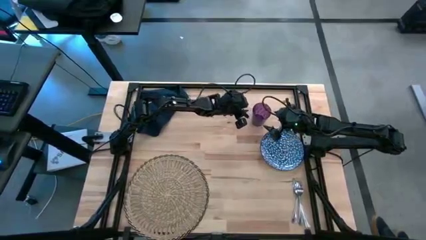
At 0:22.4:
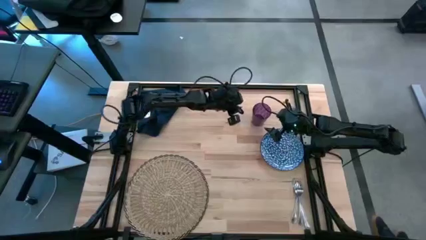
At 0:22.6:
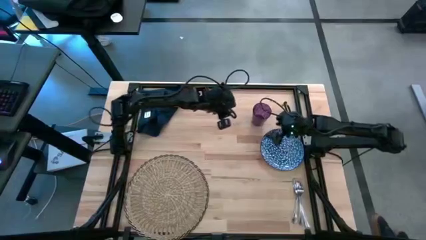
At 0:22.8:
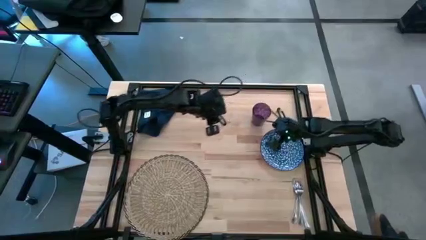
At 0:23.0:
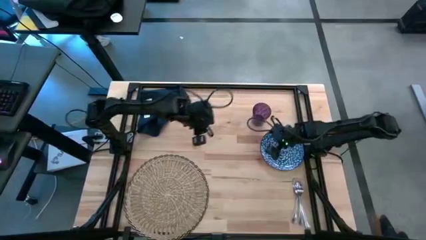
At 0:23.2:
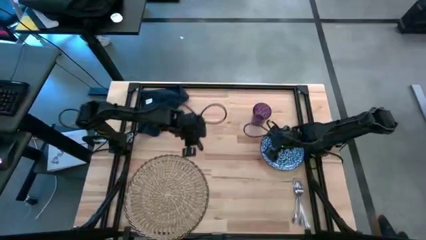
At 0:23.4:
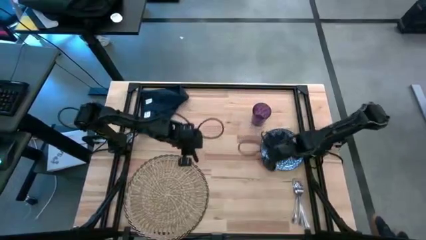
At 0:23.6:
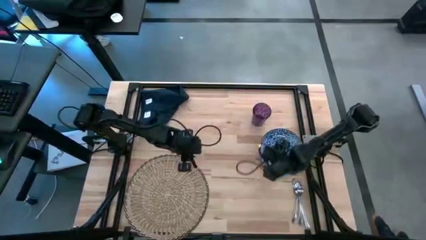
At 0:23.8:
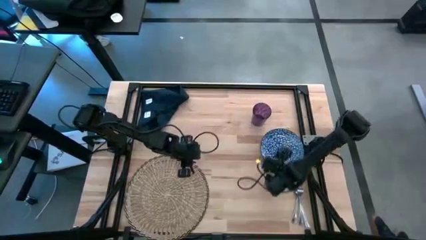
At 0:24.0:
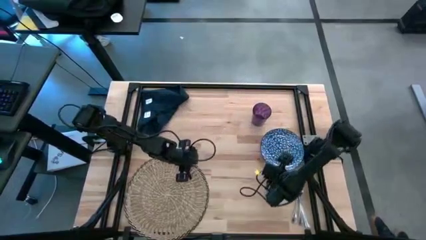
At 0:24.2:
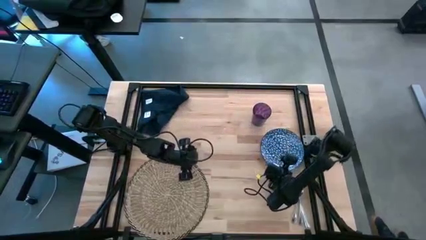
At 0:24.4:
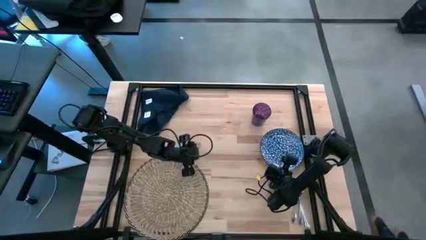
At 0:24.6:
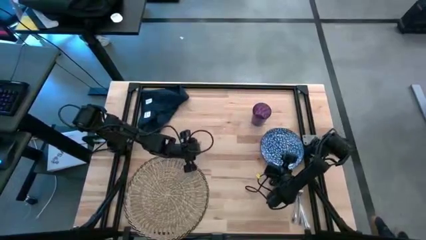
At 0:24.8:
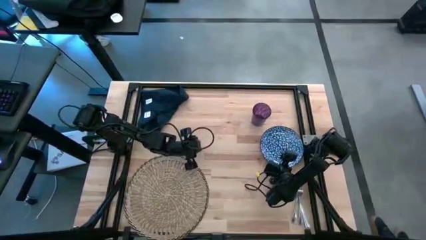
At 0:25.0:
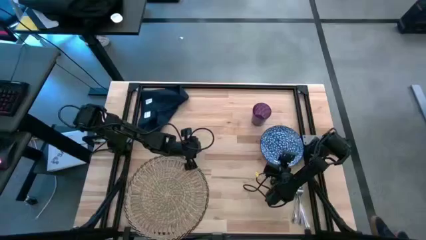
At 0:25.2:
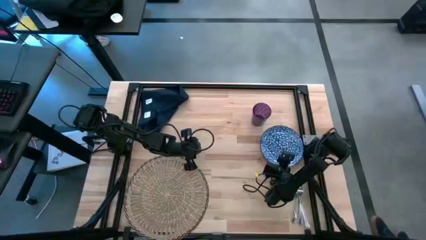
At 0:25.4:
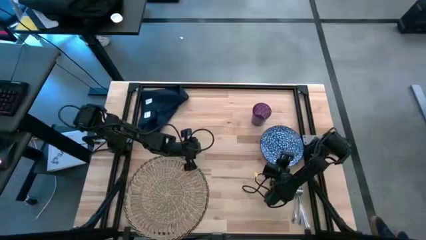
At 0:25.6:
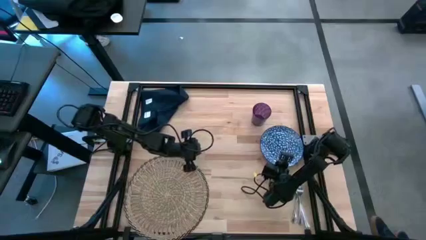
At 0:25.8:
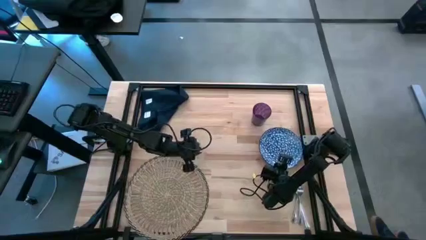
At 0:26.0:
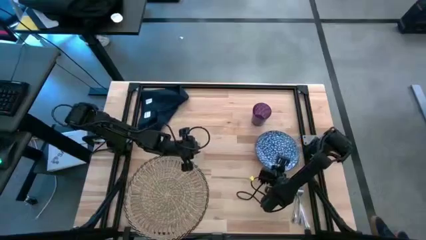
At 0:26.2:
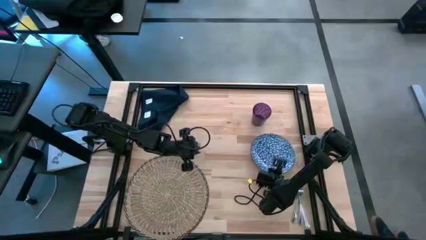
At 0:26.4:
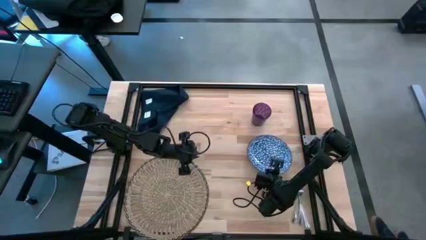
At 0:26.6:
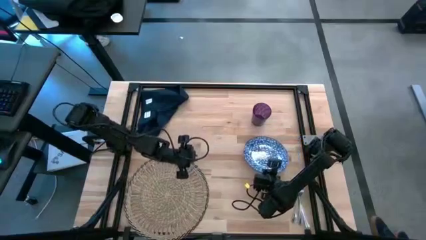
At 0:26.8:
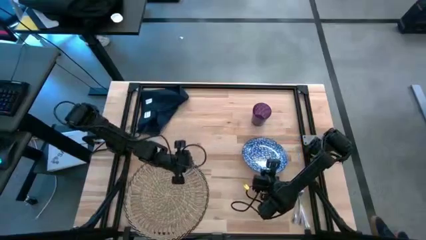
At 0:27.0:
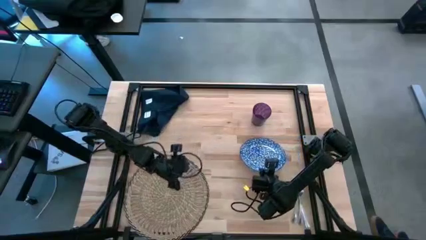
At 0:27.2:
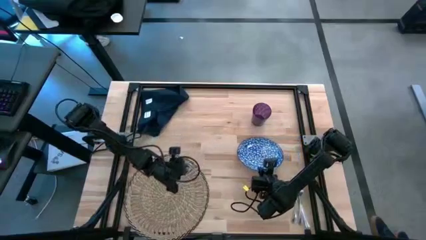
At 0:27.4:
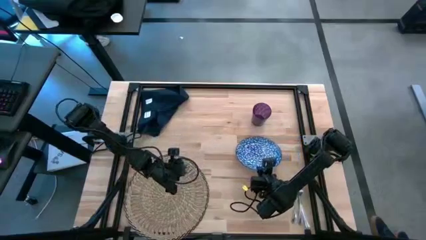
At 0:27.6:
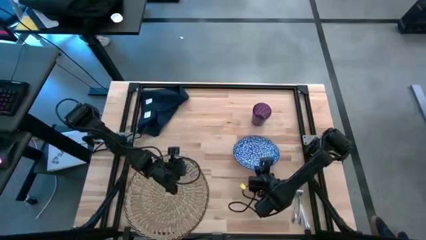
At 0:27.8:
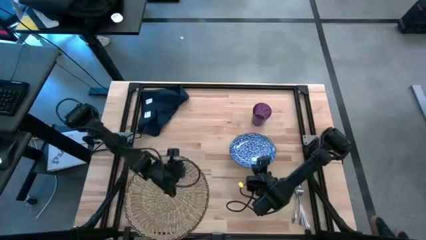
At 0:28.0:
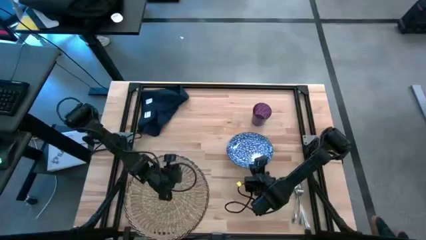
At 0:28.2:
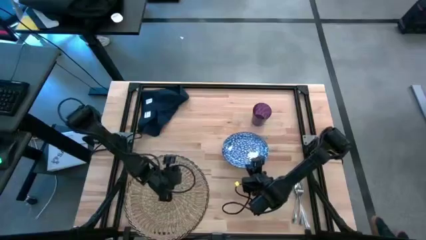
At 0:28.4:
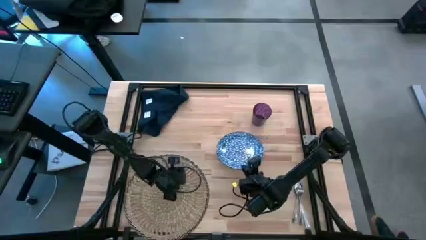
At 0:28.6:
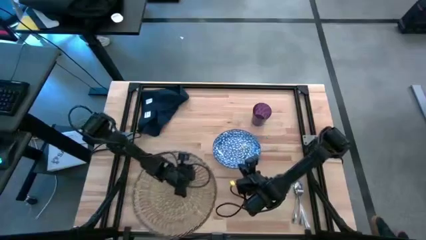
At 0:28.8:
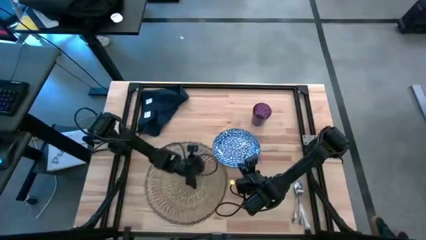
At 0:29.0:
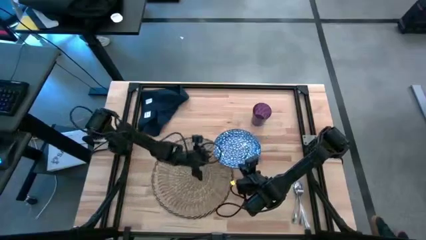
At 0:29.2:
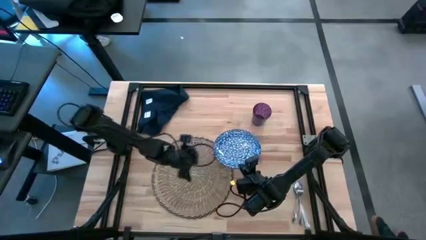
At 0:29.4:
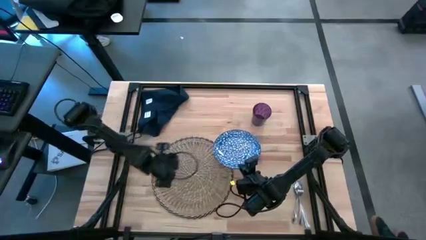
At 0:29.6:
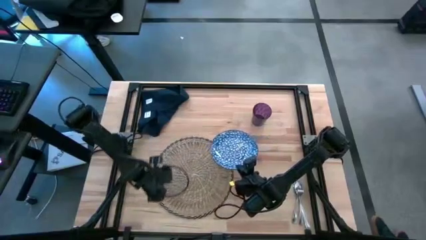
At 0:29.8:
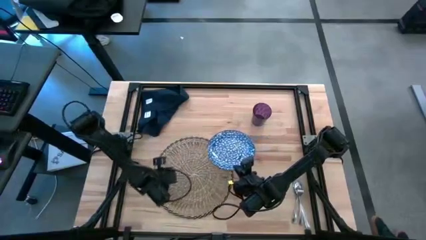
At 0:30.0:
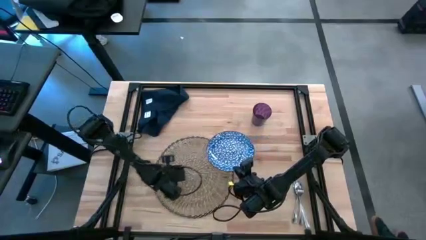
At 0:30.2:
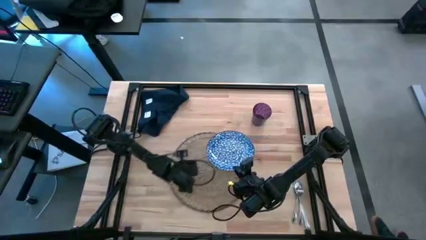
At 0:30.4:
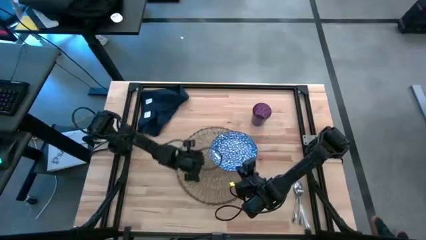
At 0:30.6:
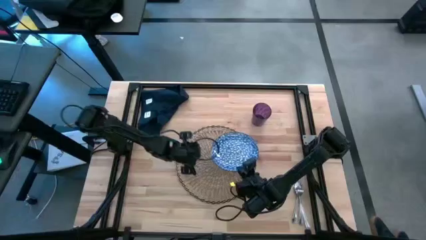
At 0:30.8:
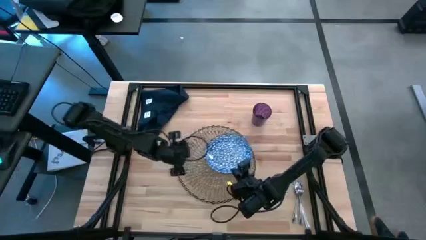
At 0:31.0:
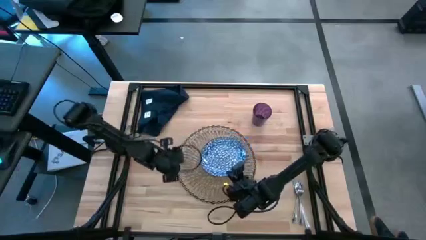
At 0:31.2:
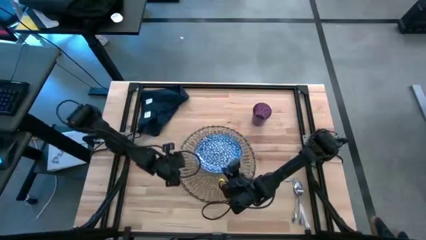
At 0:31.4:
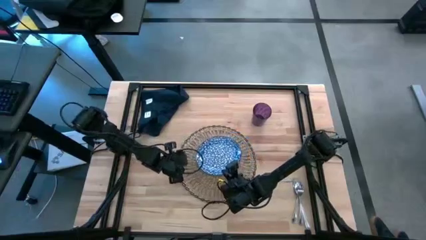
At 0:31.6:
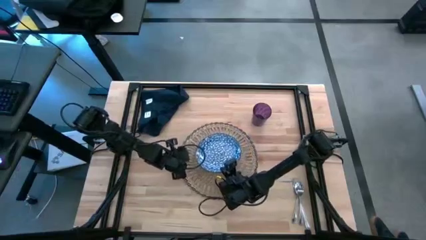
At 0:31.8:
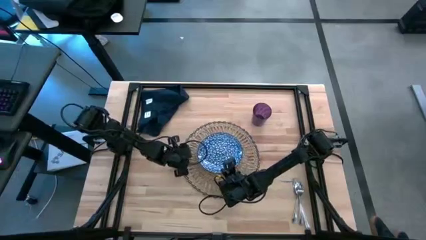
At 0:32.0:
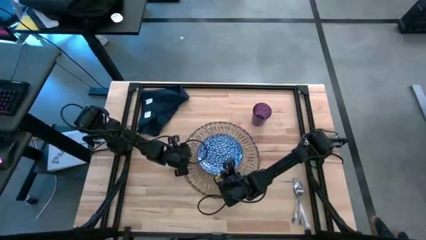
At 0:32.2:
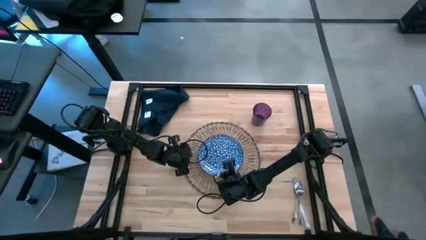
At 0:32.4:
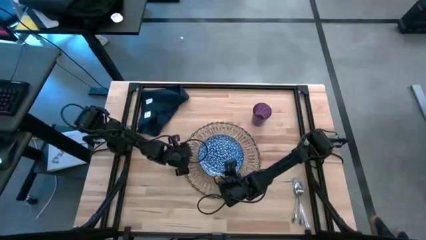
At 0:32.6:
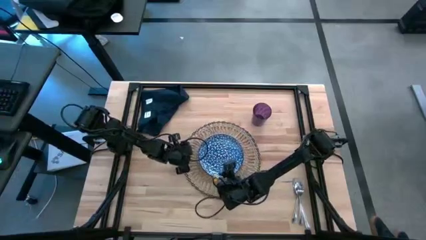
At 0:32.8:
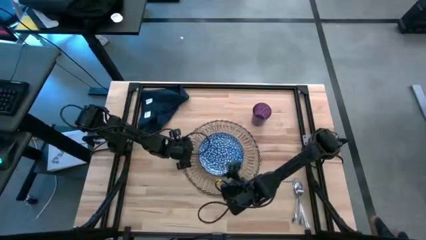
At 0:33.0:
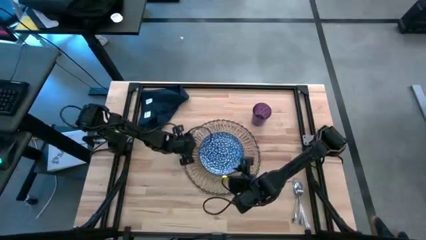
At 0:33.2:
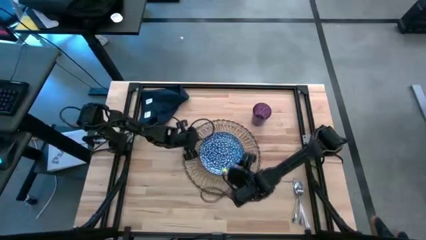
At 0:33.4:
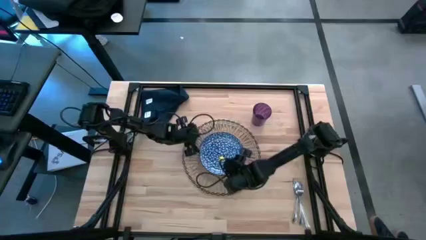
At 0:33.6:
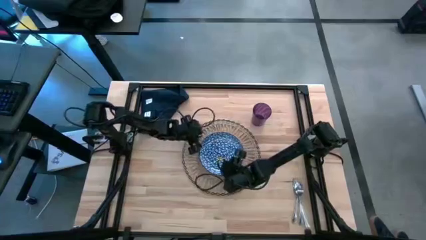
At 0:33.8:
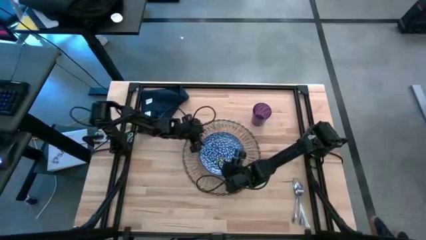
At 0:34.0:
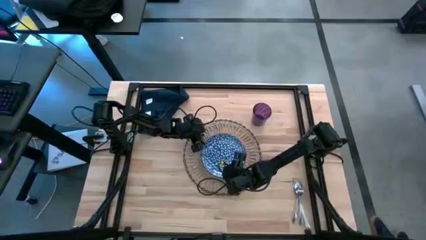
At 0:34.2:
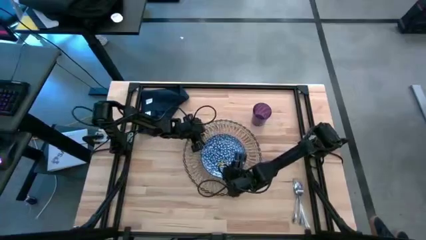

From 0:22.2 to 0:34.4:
Task: Set table place
Put the blue plate on the center of the table mat
